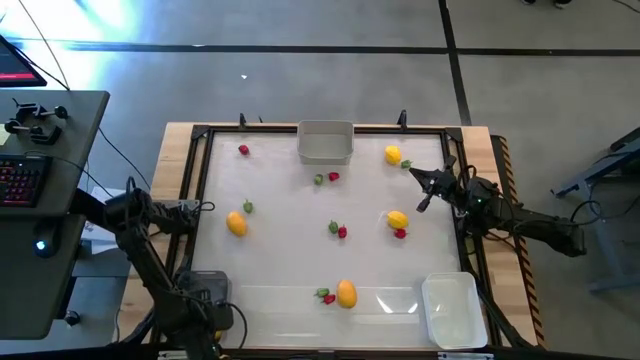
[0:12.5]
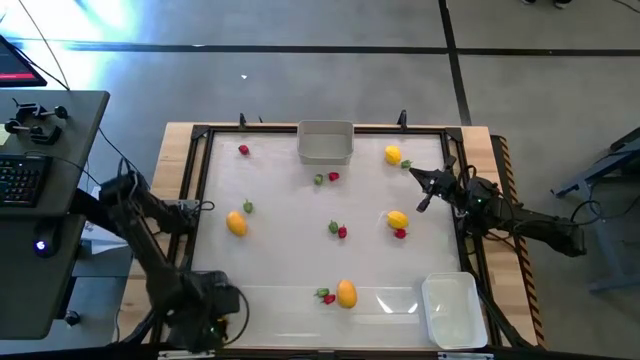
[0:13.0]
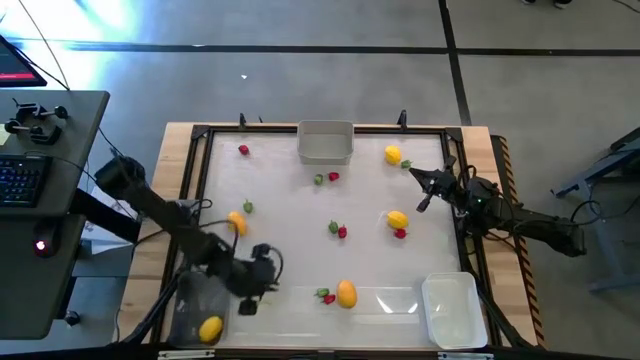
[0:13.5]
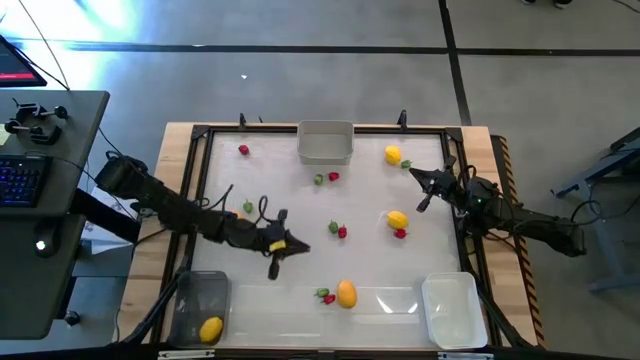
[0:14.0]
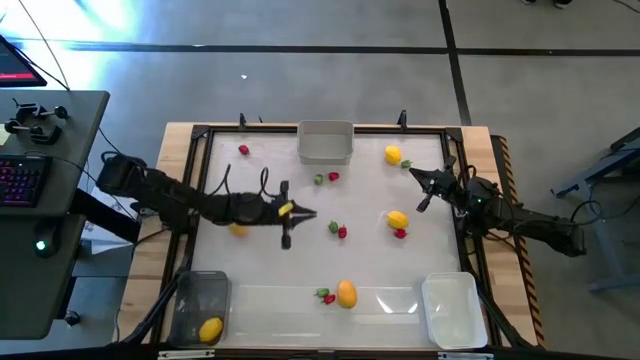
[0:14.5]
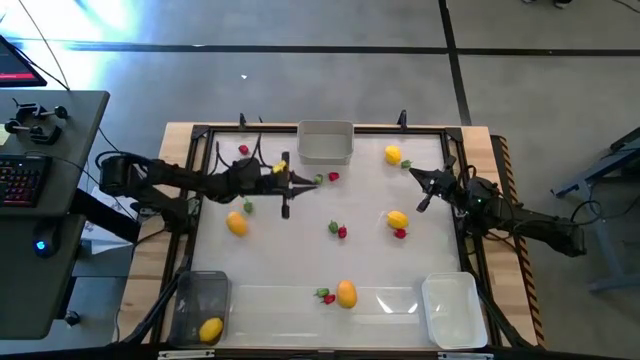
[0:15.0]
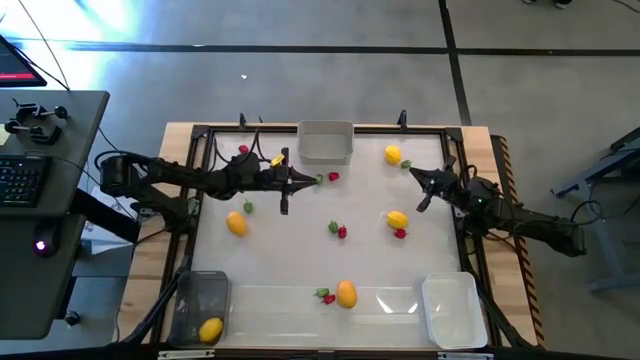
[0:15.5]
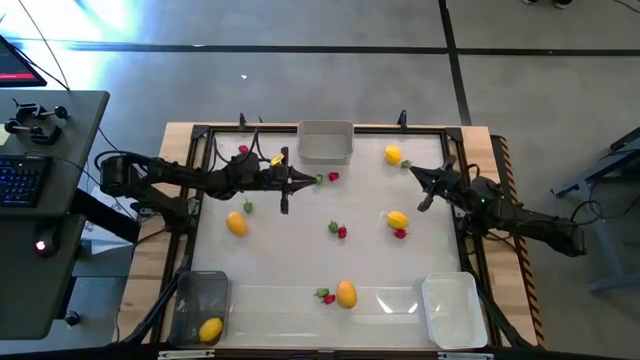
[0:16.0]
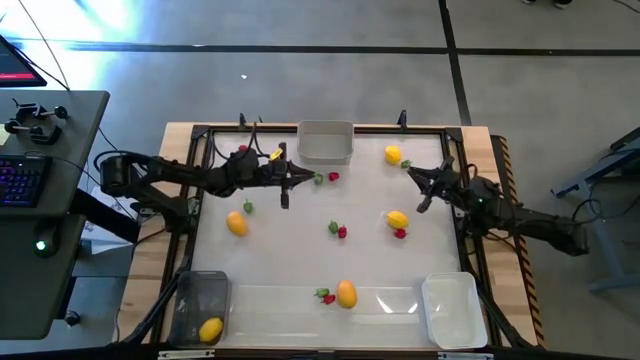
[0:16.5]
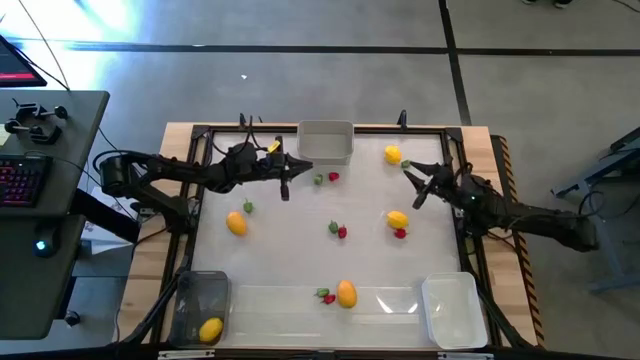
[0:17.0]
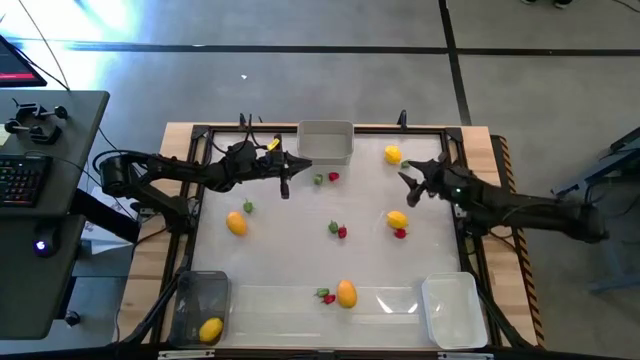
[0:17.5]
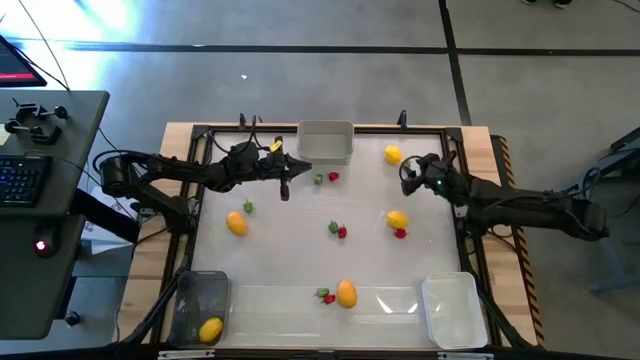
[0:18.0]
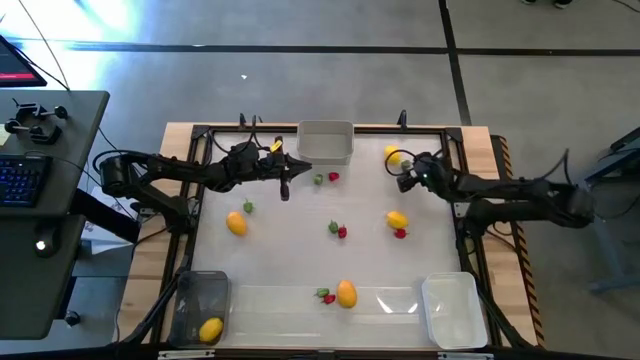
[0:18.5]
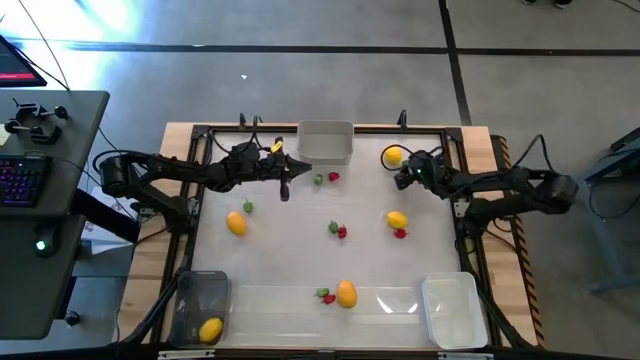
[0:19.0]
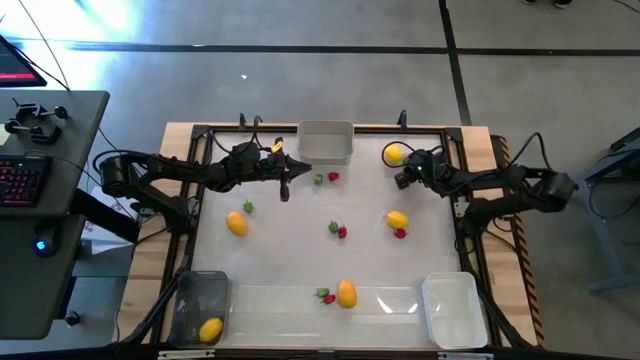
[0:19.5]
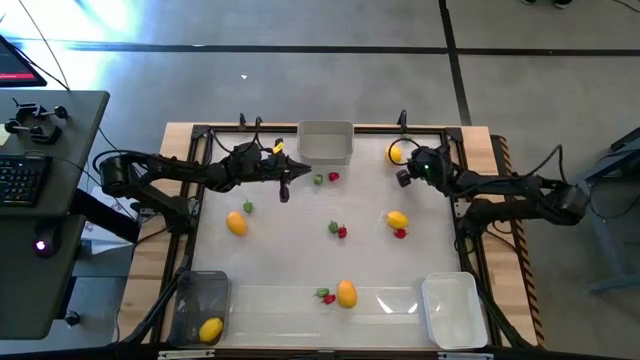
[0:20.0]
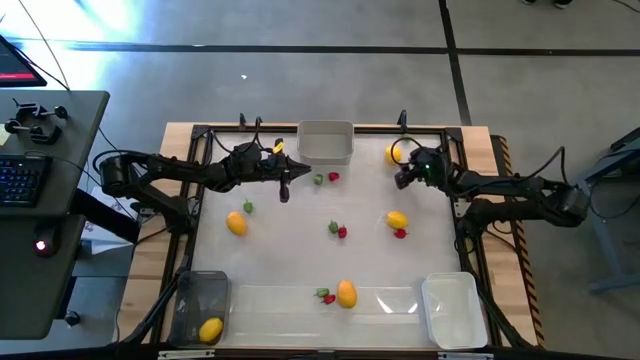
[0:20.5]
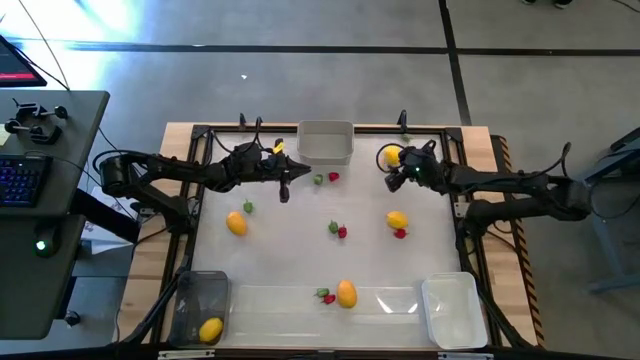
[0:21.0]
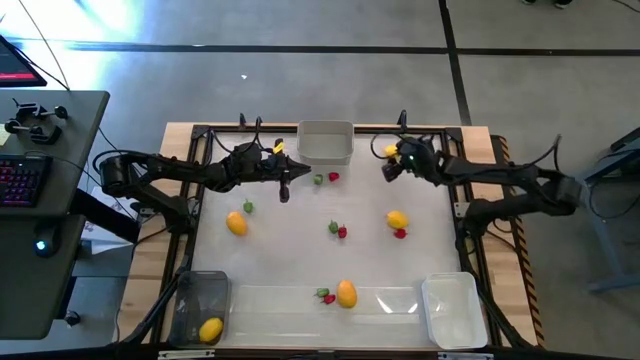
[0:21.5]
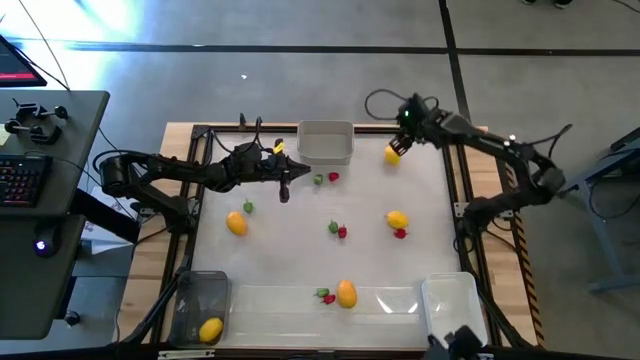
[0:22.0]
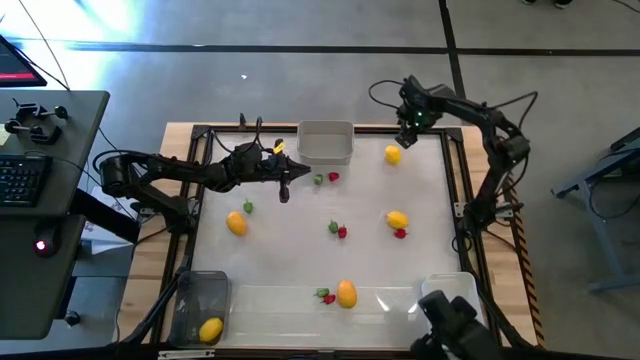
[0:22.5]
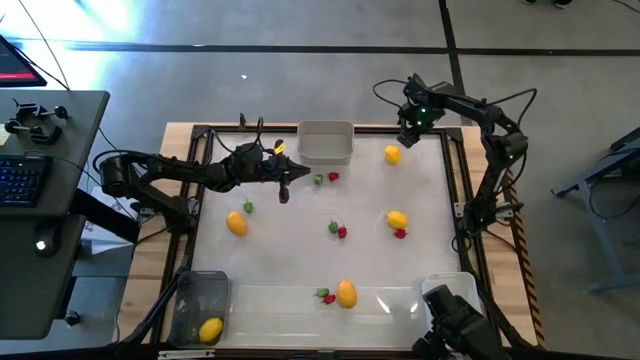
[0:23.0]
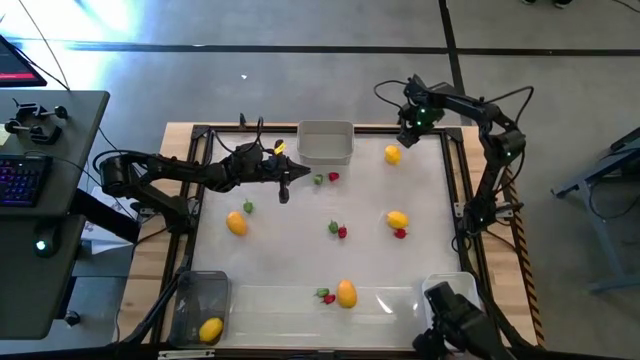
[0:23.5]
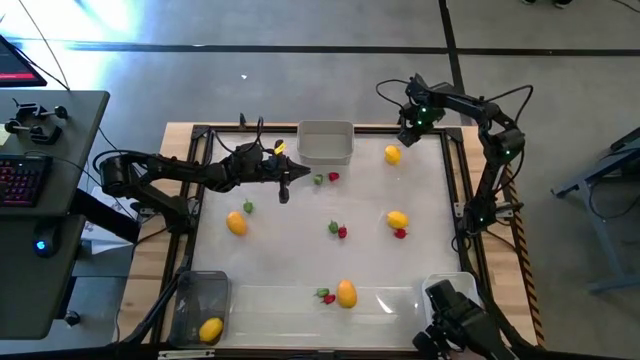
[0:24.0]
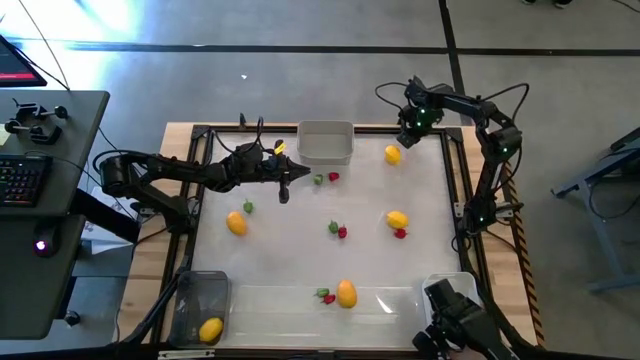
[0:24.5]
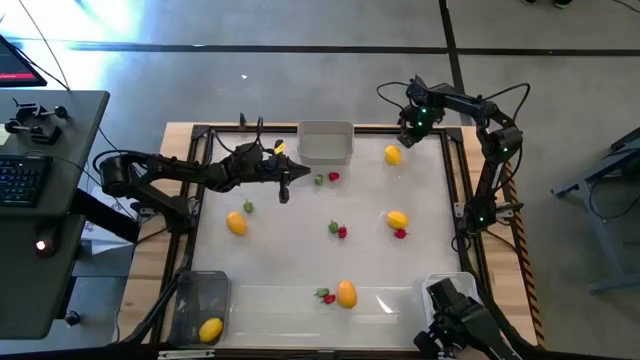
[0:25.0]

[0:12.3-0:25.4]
Task: Sort produce into baskets
Put the green chili pepper into the gray bin

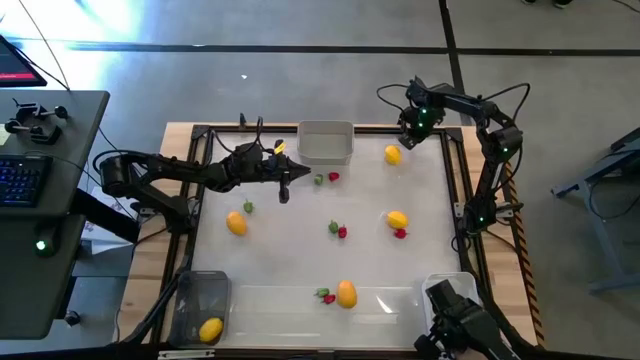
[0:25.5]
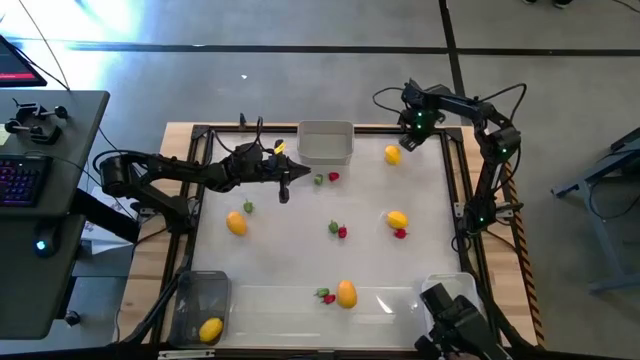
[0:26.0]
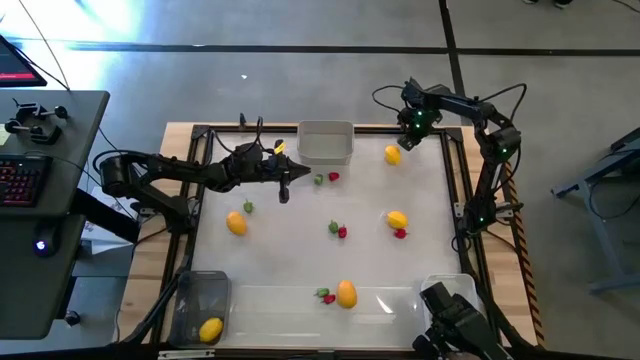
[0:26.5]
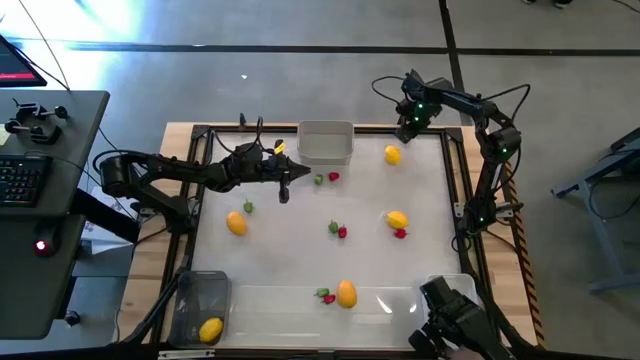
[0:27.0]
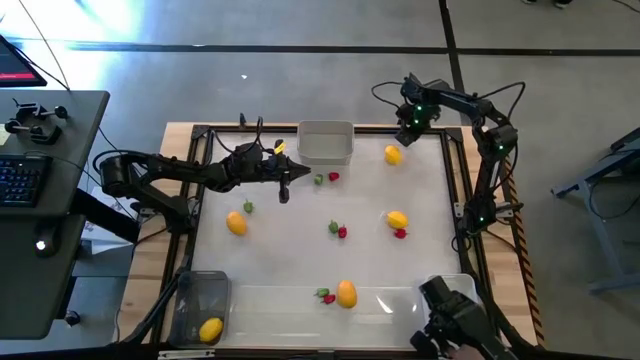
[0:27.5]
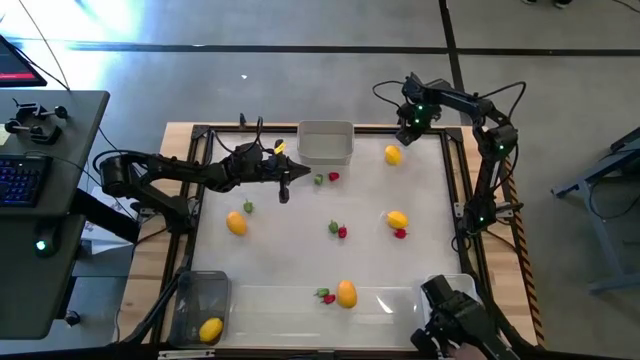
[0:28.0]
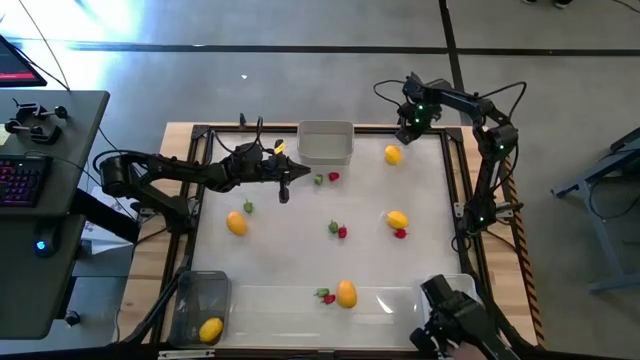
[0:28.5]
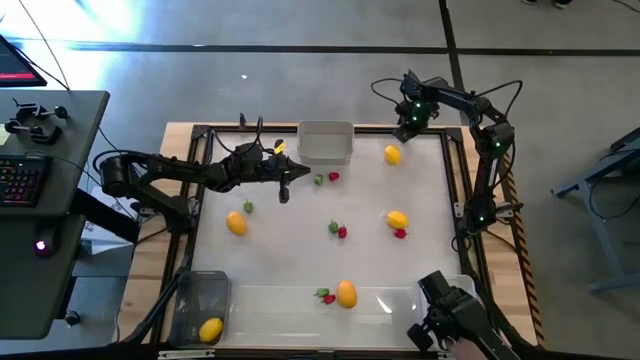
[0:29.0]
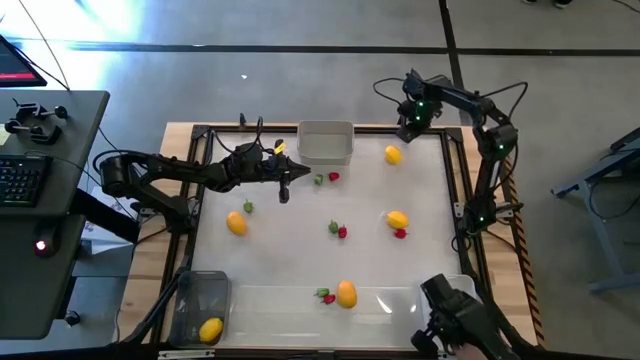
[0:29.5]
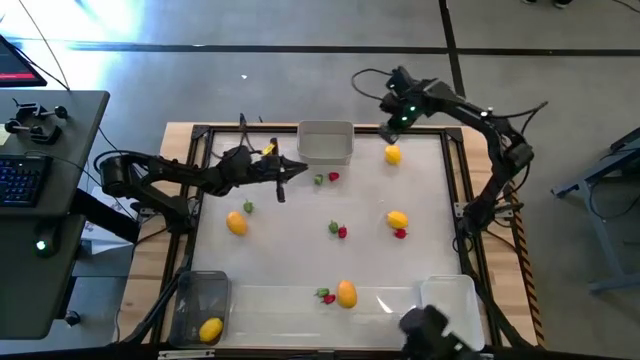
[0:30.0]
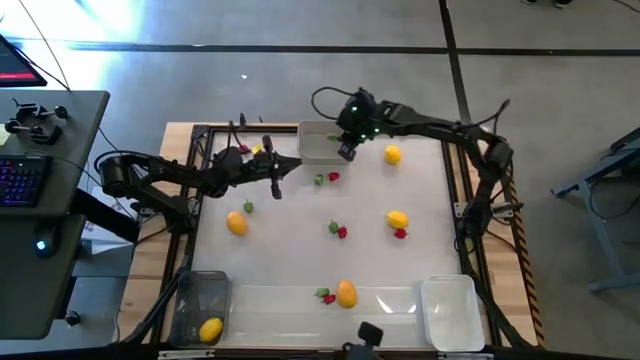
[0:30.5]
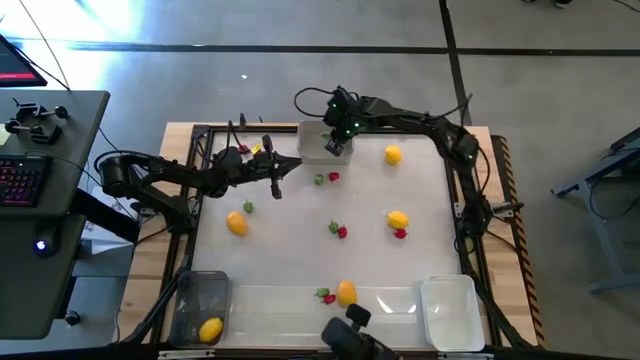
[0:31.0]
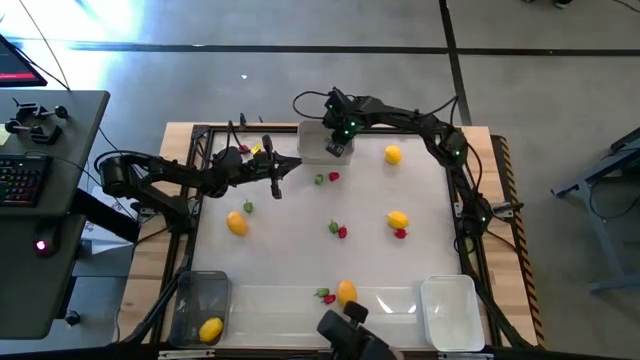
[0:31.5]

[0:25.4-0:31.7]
Put the green chili pepper into the gray bin

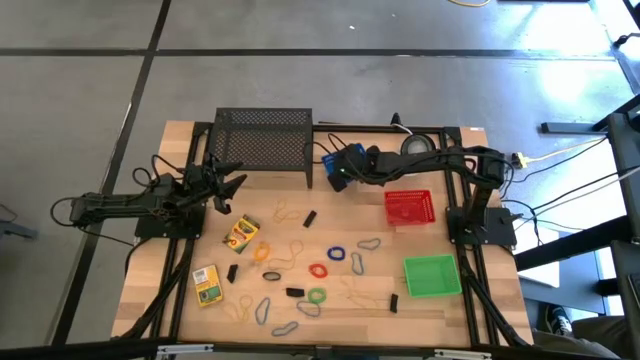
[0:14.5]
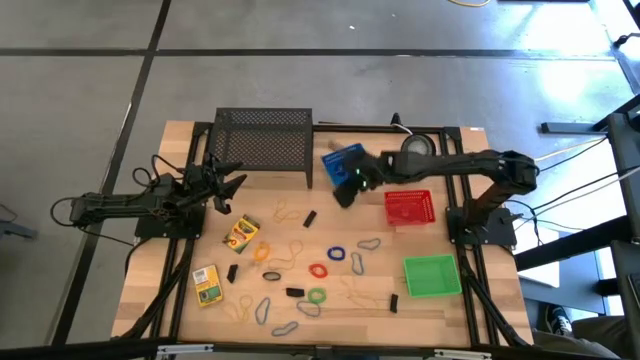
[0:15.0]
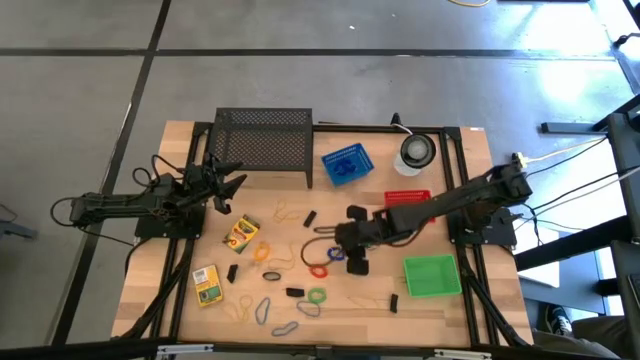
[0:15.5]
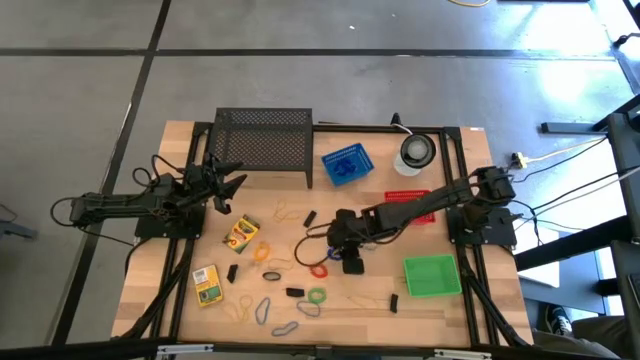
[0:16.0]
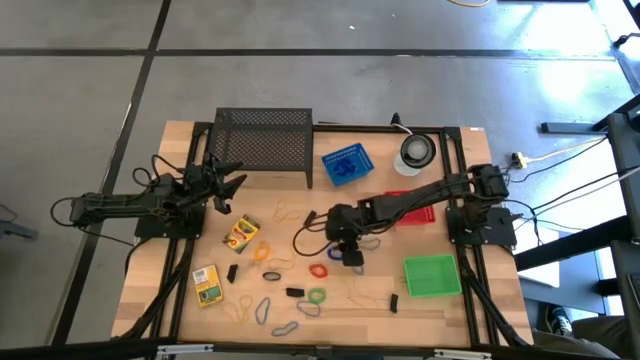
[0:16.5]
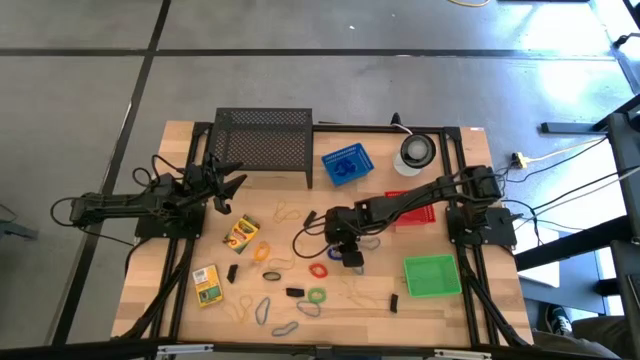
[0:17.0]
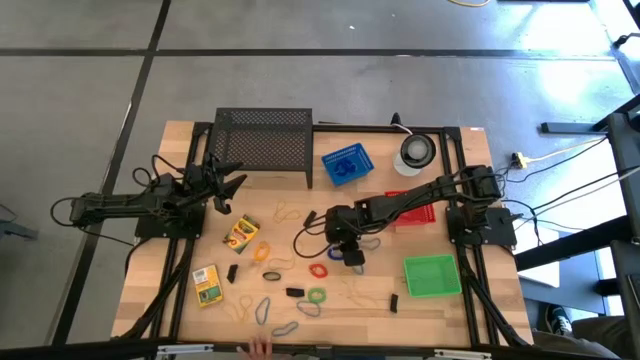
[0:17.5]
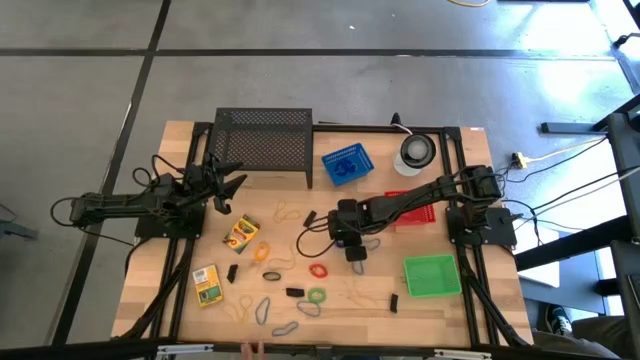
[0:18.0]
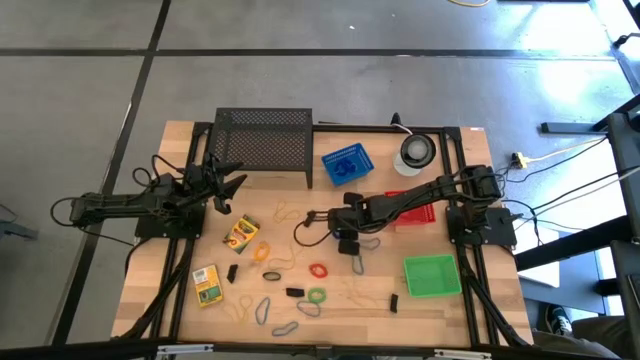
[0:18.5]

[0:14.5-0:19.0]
Task: Pick & Place Office Desk Supplies
Put the blue wrist coil into the blue bin
